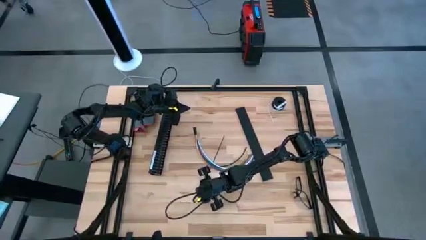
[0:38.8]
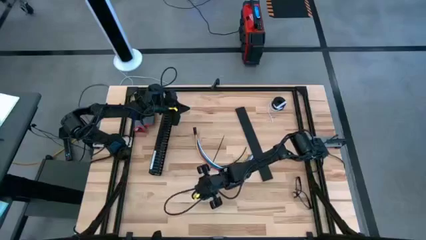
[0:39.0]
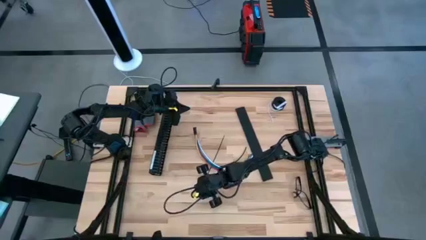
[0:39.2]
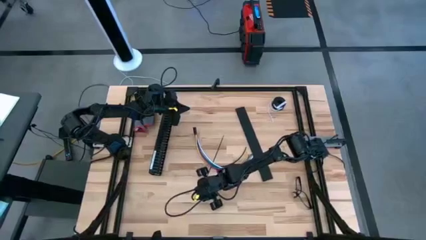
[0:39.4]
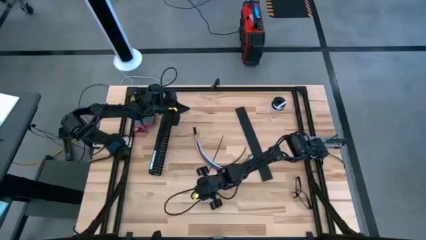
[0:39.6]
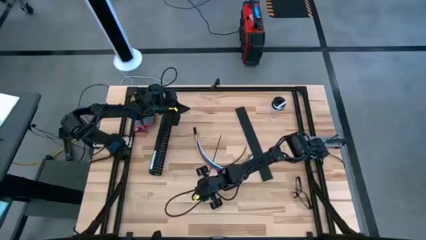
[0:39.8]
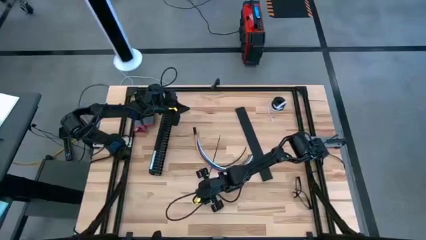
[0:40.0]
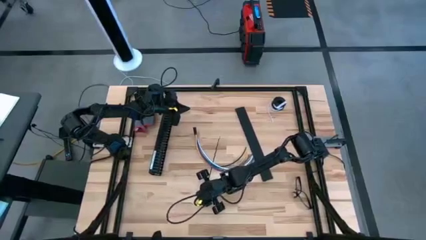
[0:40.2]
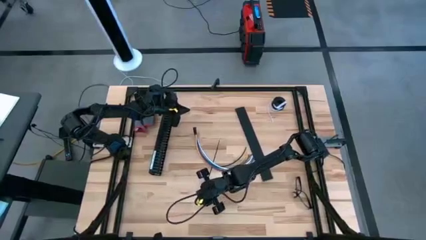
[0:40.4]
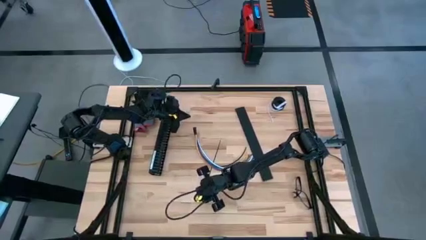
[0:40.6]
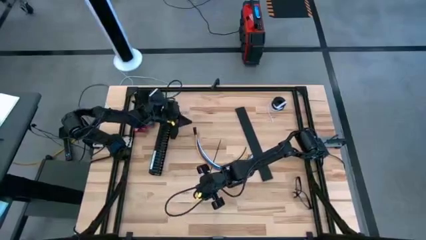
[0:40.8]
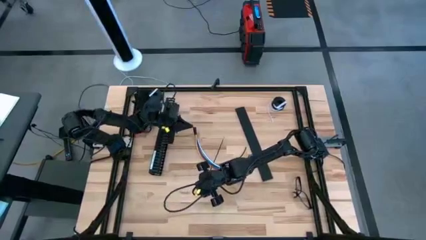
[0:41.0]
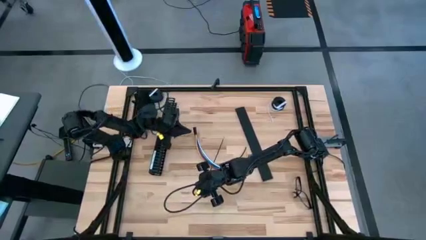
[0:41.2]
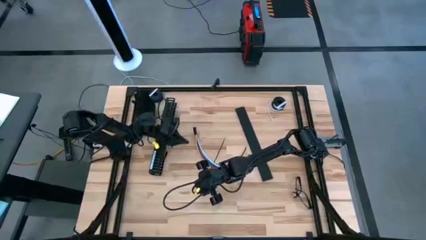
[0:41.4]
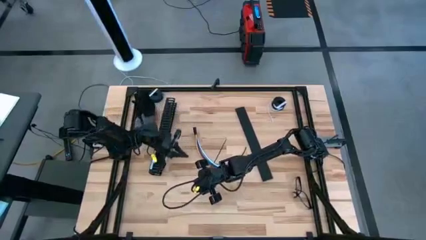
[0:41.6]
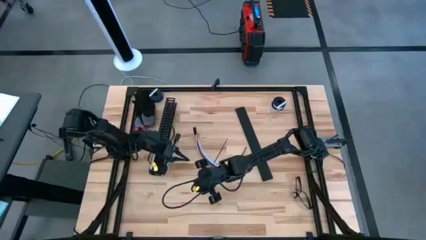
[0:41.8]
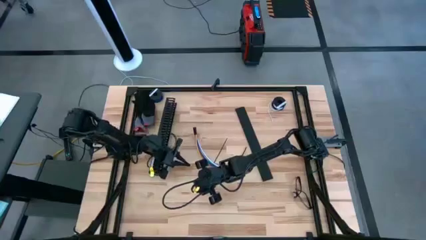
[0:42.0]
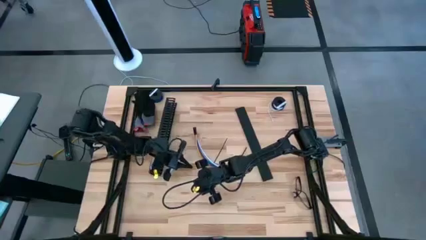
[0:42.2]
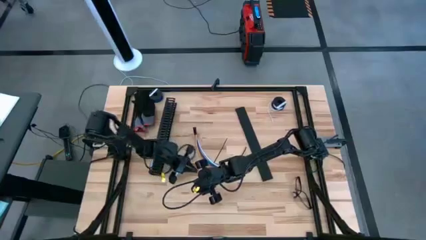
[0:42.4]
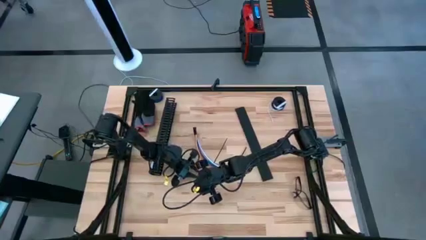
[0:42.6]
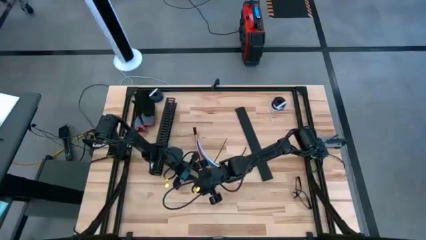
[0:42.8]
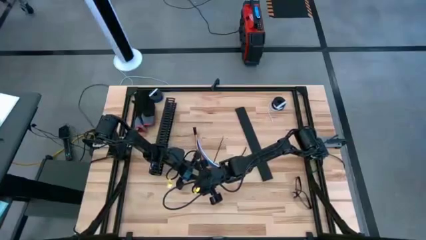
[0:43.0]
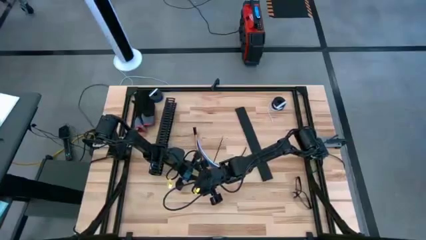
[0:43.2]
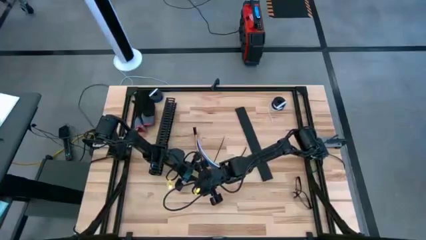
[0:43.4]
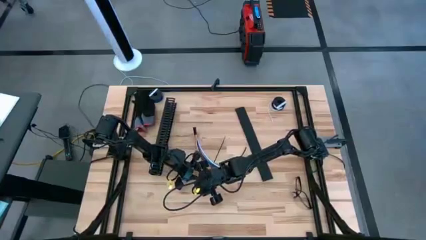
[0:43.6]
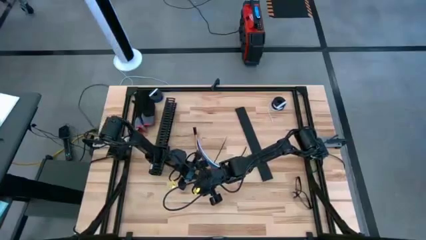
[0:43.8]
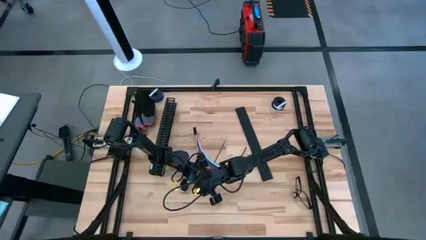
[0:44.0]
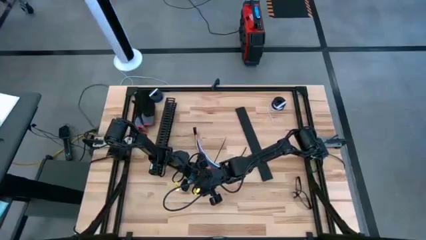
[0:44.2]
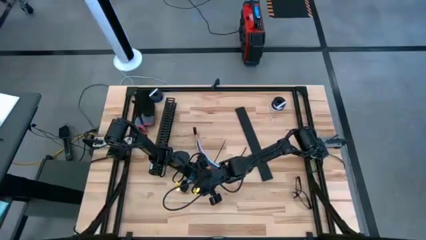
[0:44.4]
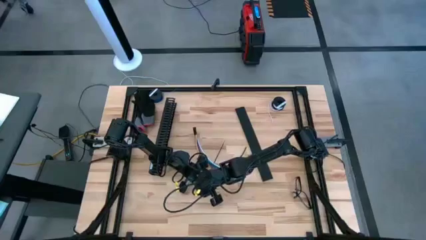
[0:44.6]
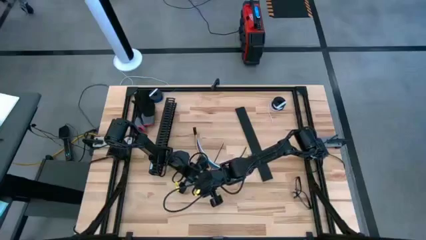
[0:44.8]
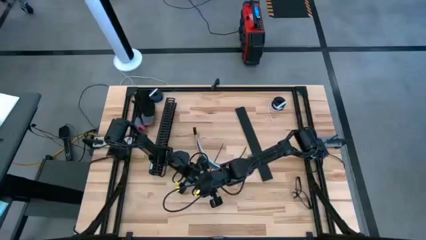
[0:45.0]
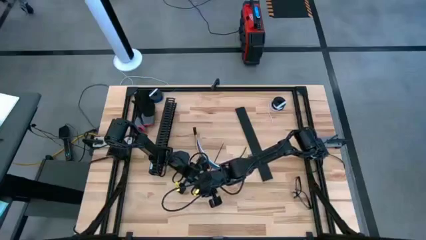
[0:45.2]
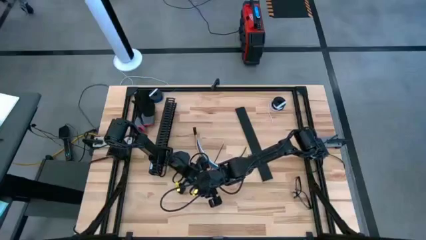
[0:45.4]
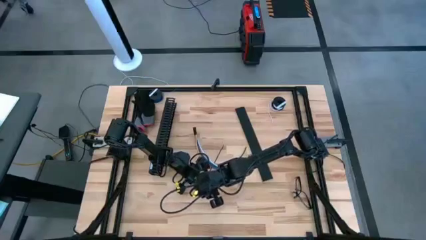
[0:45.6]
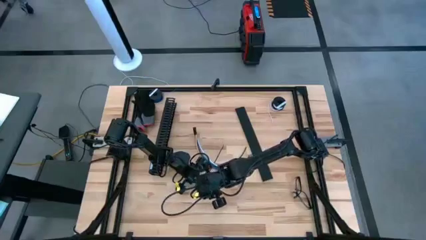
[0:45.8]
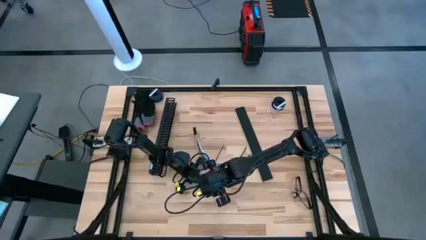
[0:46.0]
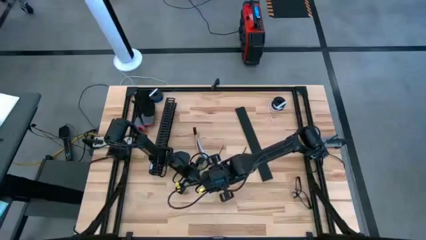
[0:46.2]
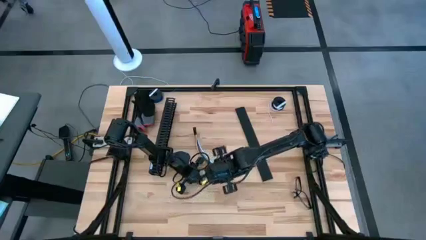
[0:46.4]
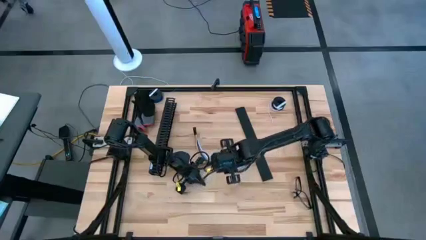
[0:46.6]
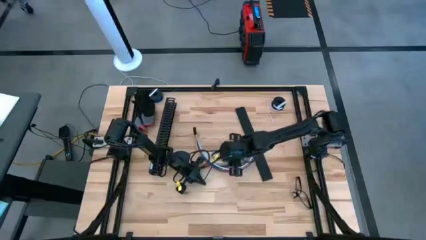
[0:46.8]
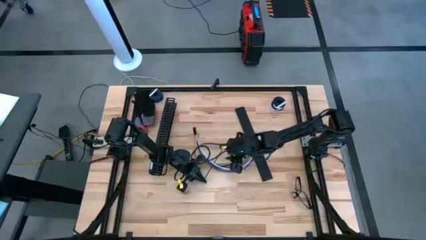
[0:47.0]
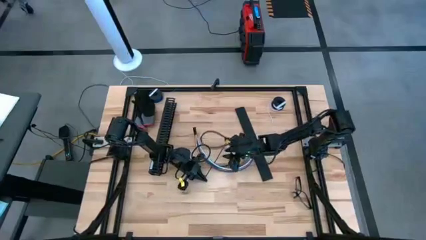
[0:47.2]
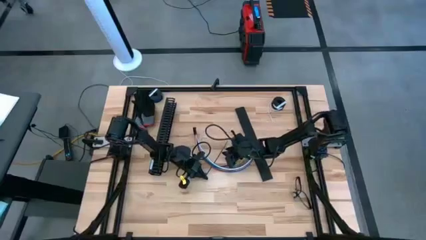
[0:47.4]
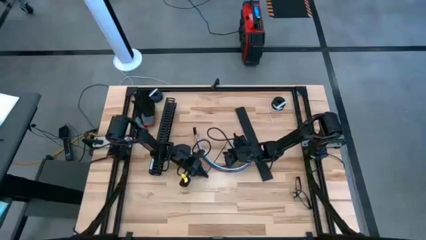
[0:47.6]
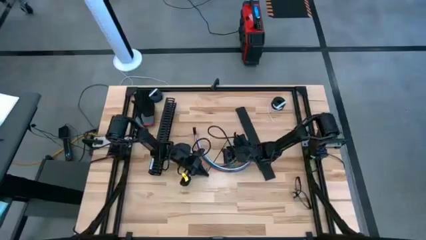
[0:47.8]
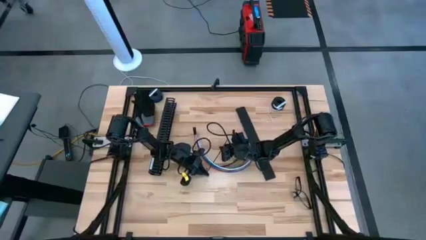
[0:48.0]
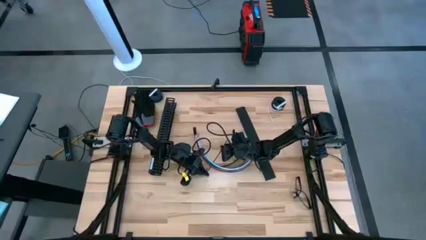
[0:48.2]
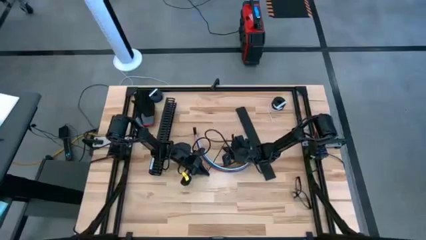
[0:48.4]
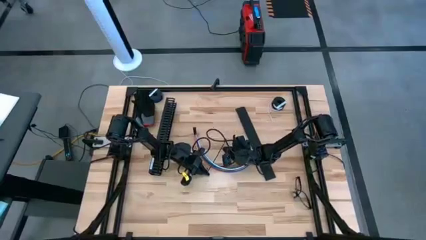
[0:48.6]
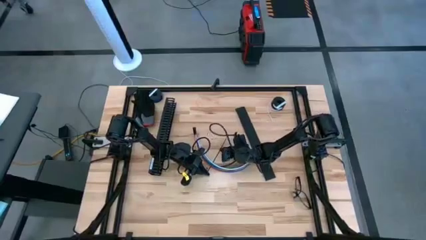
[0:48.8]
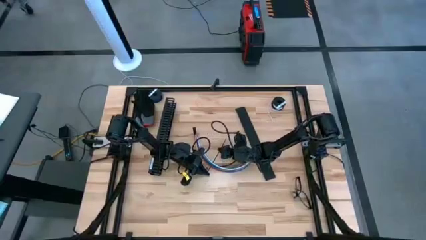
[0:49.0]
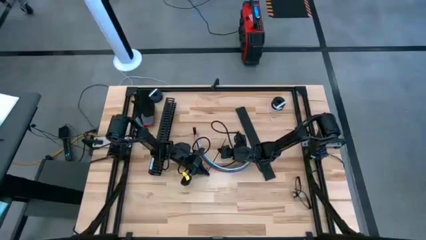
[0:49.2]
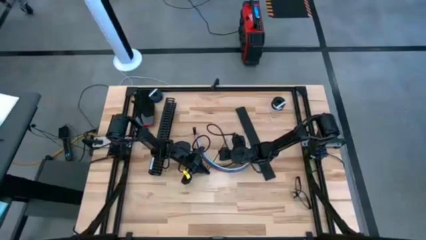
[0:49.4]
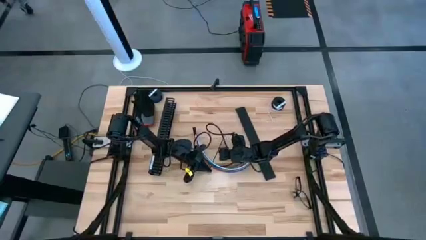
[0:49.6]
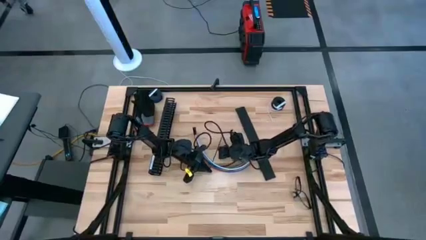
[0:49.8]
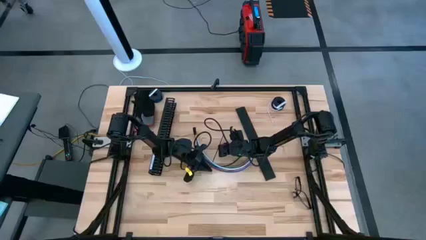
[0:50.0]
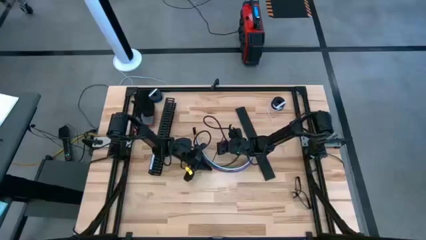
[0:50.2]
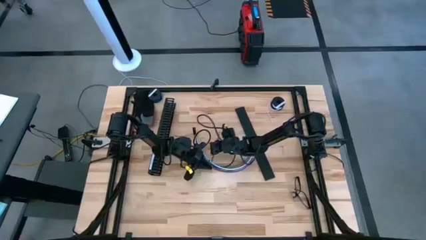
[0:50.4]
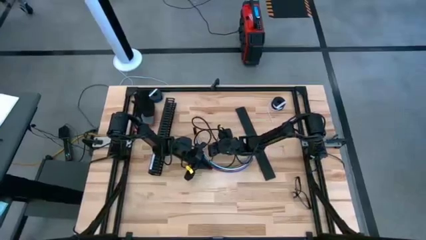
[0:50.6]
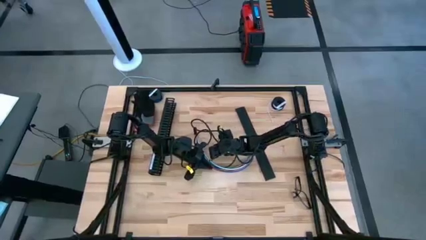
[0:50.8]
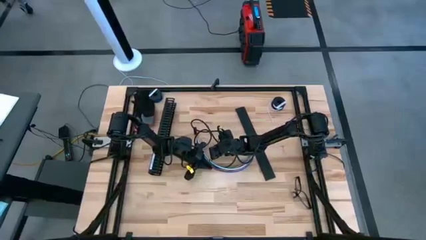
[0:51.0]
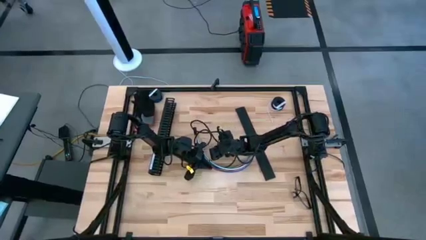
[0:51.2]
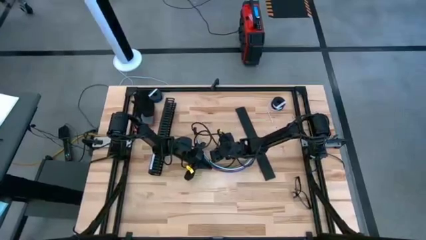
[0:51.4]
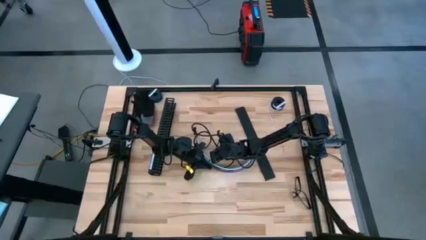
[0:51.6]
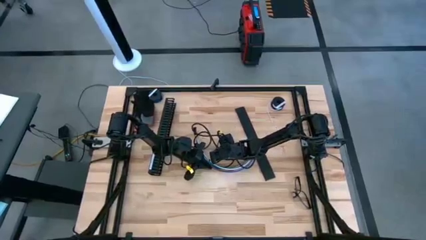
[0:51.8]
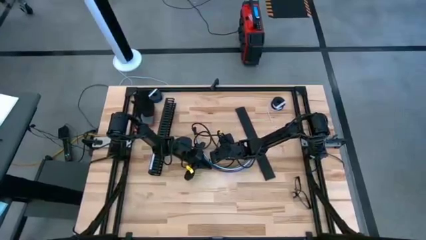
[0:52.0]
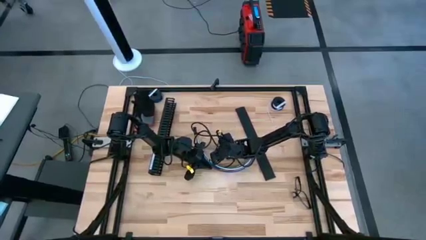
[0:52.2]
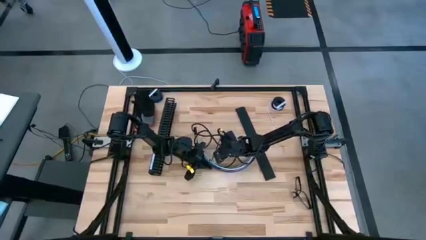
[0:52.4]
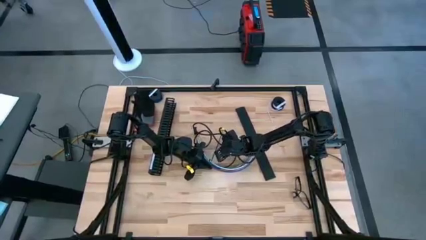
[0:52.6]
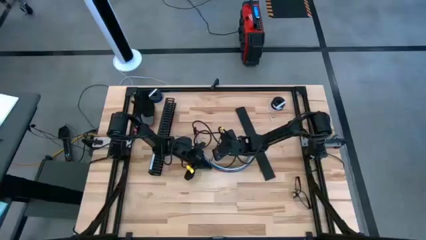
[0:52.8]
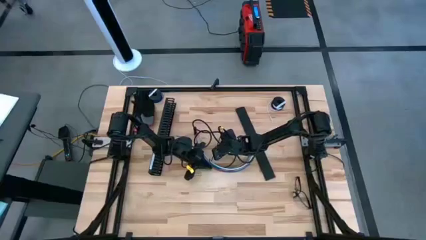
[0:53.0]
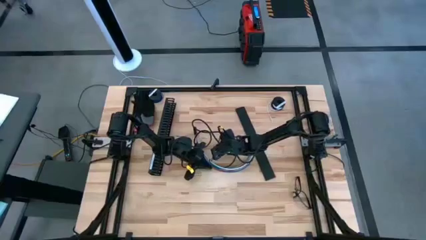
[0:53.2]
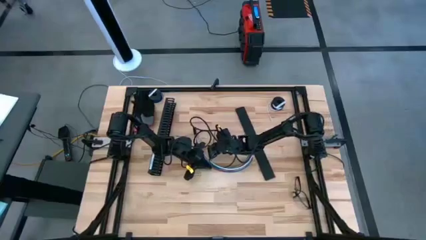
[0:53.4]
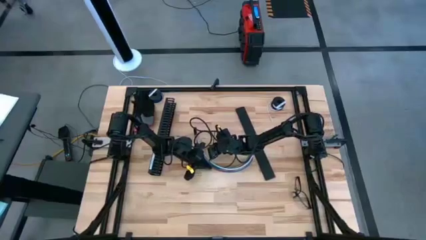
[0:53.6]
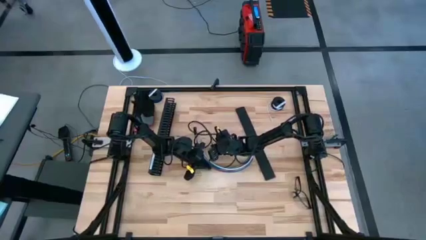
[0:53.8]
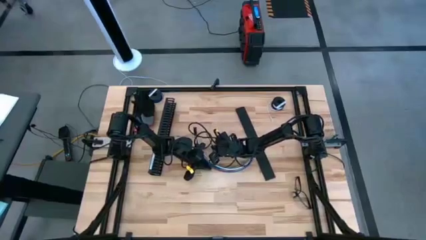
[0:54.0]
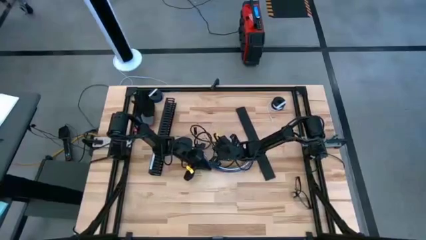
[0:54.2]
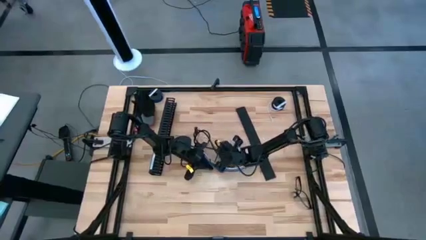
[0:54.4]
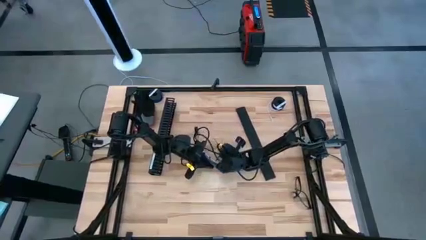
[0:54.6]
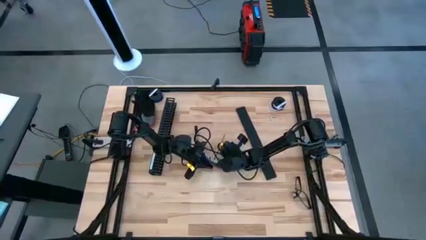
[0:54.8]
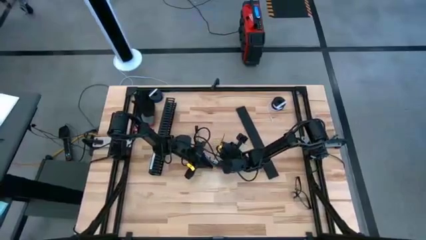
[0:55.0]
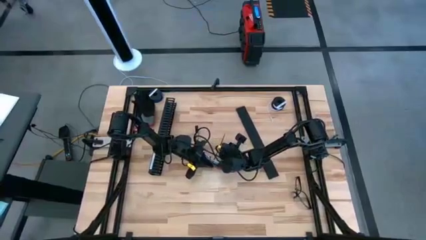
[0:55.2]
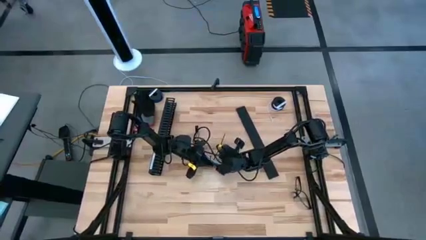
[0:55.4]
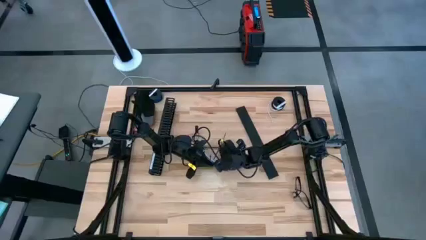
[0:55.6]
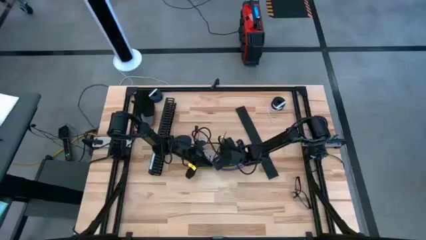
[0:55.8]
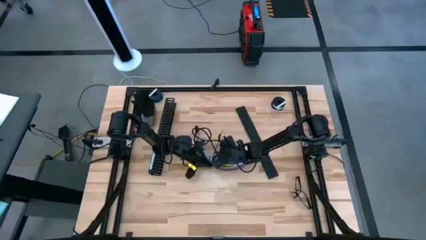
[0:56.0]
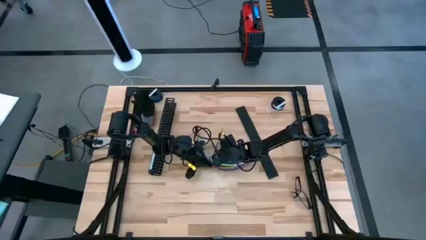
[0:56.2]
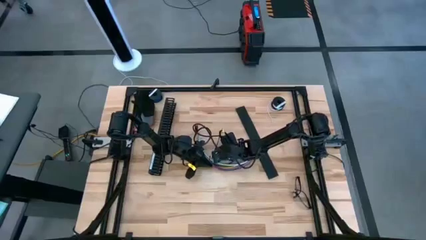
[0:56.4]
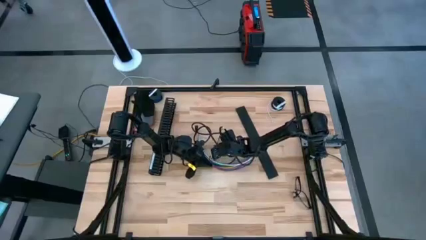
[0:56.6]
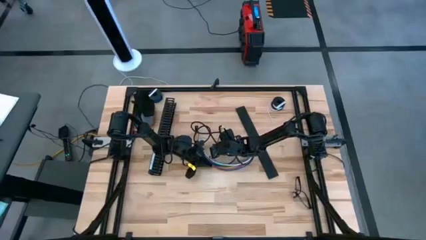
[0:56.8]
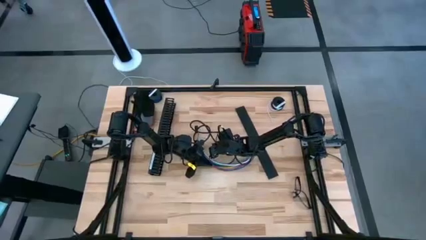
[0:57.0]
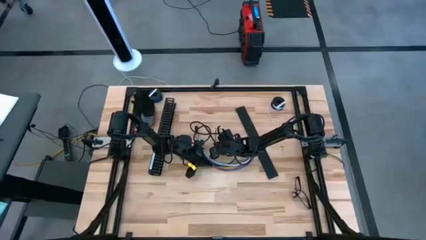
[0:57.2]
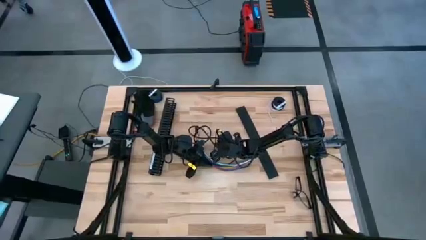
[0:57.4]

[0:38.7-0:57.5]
Task: Ziptie cables
Wrap the black zip tie on the cable
